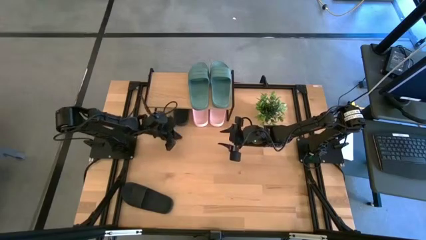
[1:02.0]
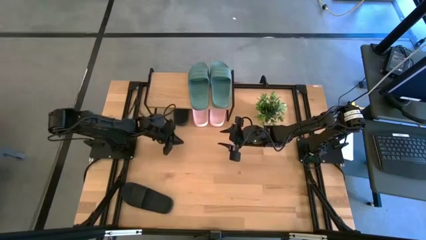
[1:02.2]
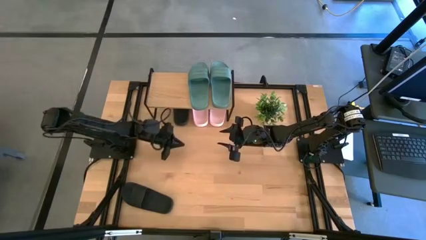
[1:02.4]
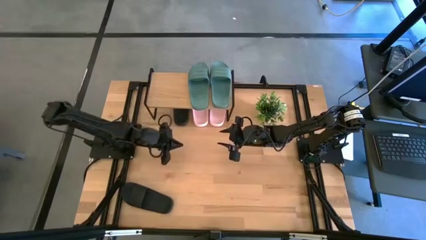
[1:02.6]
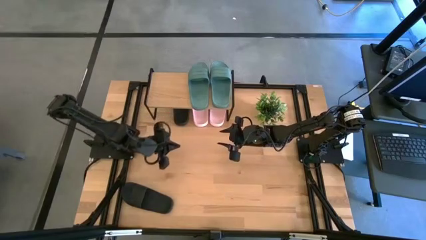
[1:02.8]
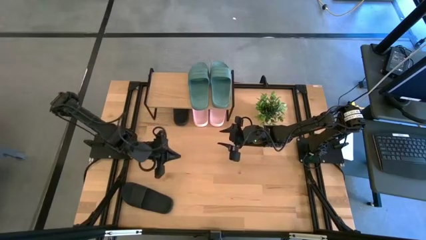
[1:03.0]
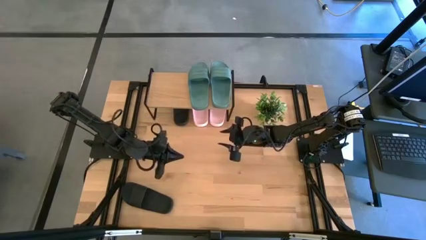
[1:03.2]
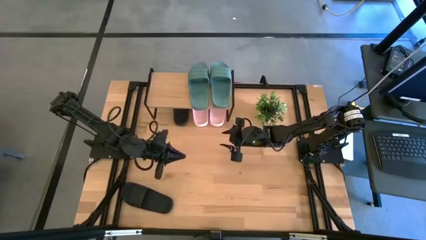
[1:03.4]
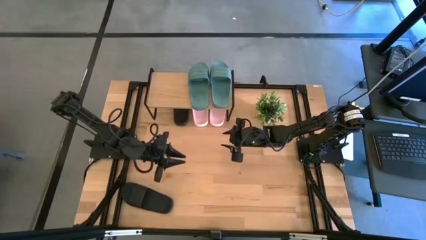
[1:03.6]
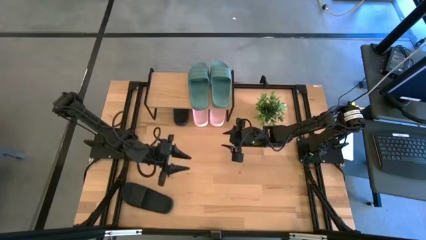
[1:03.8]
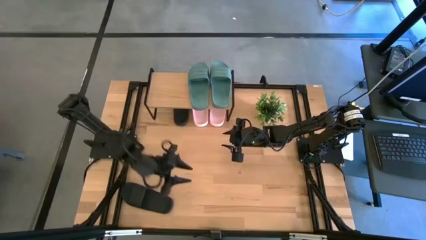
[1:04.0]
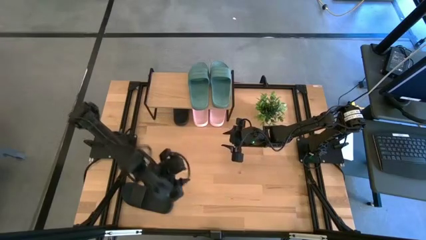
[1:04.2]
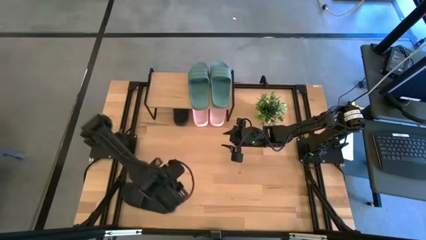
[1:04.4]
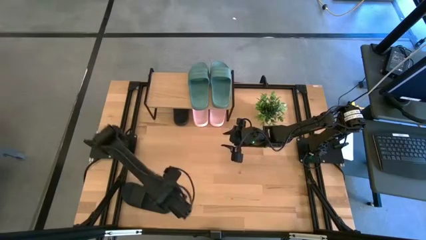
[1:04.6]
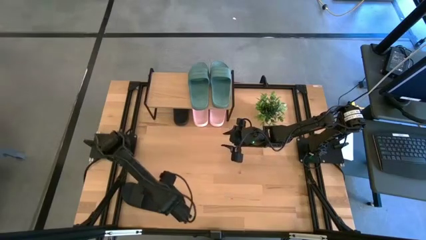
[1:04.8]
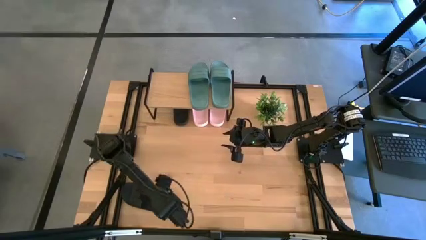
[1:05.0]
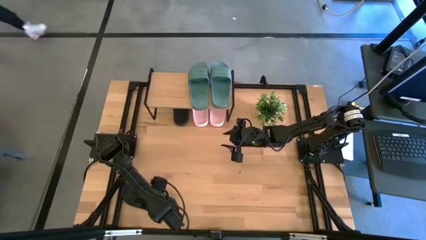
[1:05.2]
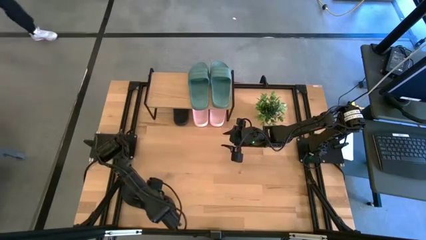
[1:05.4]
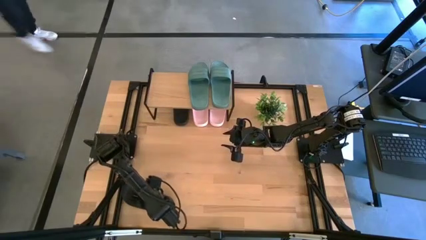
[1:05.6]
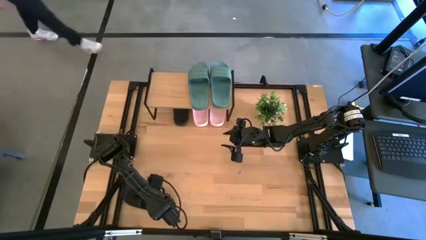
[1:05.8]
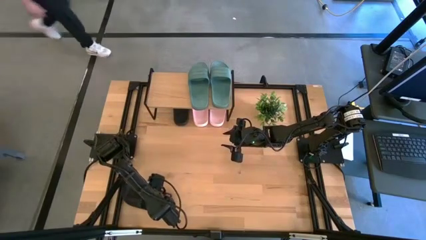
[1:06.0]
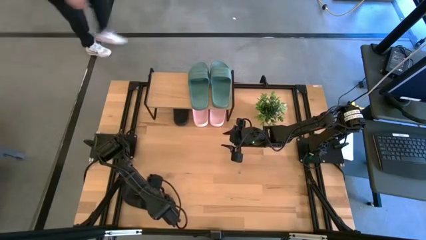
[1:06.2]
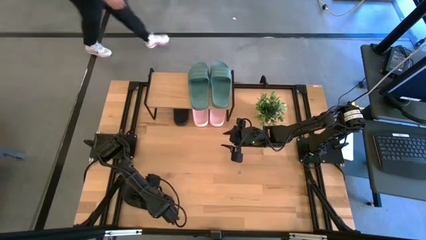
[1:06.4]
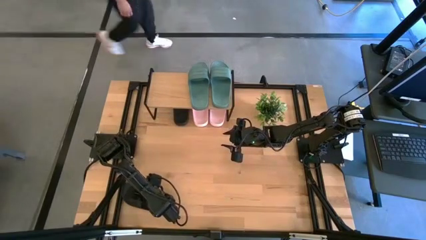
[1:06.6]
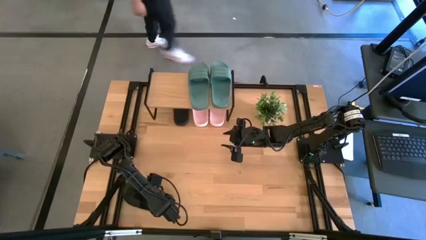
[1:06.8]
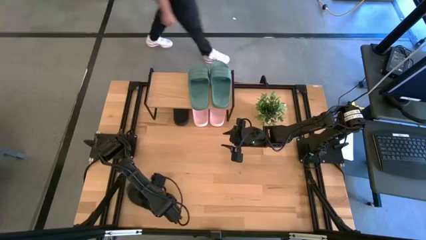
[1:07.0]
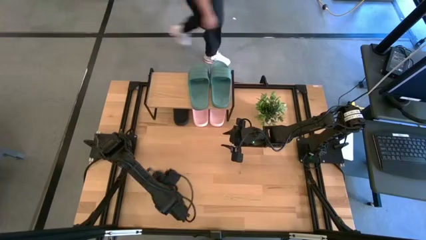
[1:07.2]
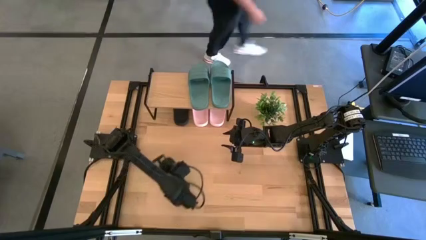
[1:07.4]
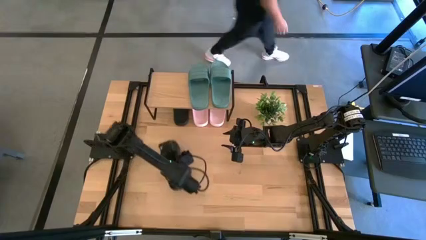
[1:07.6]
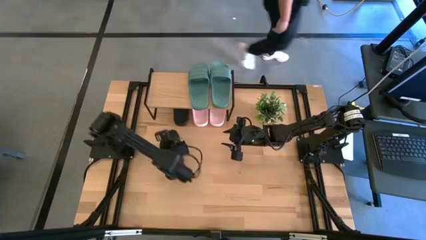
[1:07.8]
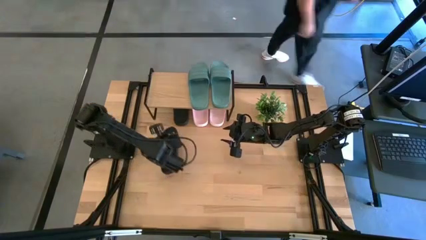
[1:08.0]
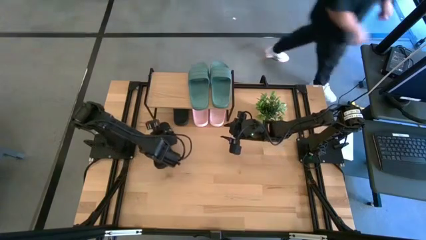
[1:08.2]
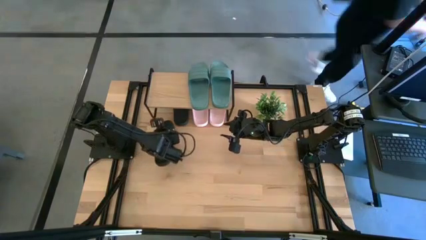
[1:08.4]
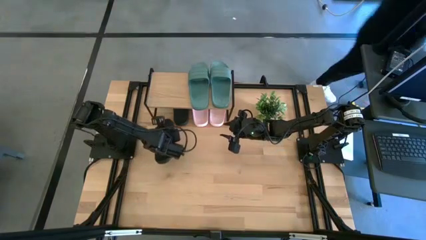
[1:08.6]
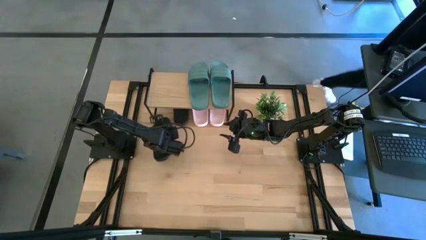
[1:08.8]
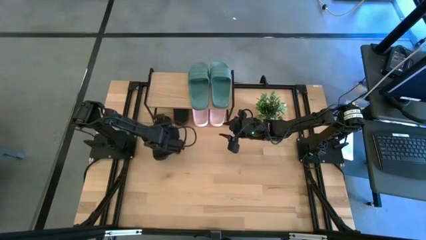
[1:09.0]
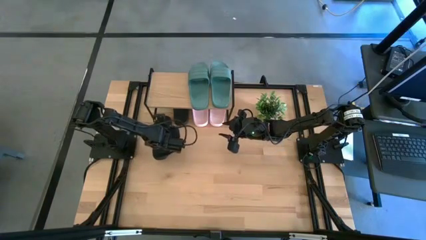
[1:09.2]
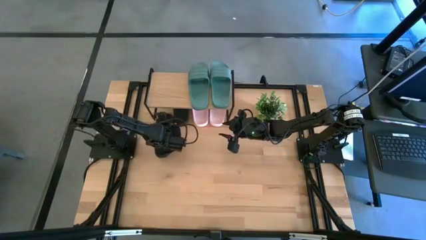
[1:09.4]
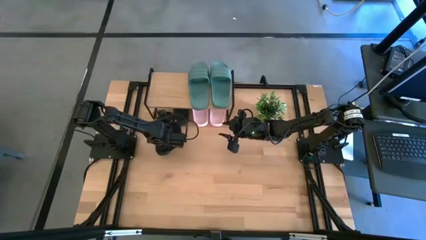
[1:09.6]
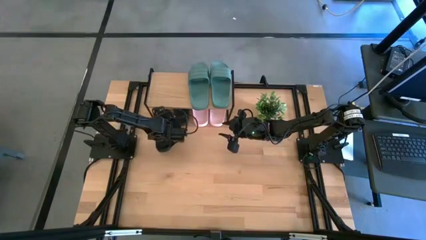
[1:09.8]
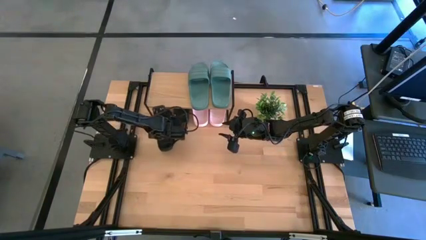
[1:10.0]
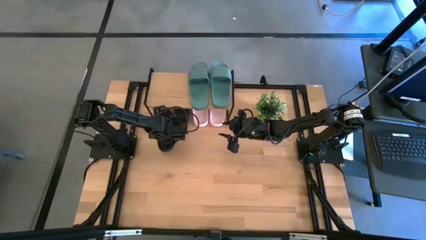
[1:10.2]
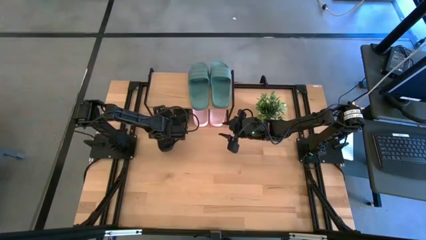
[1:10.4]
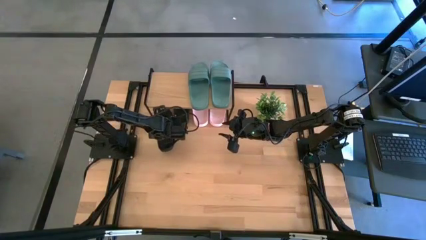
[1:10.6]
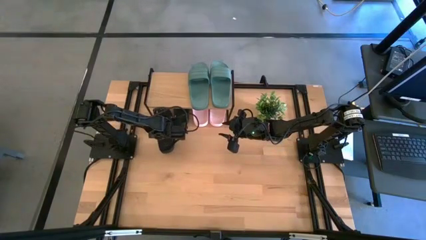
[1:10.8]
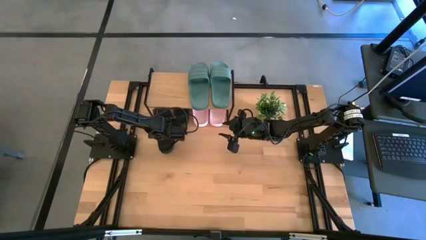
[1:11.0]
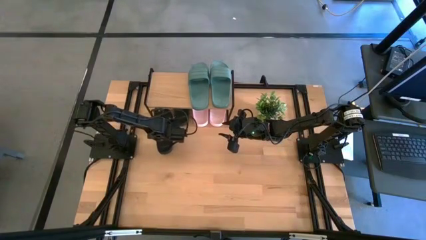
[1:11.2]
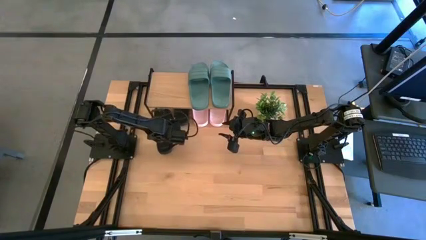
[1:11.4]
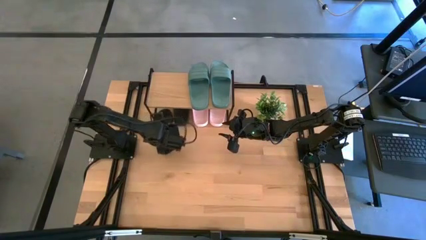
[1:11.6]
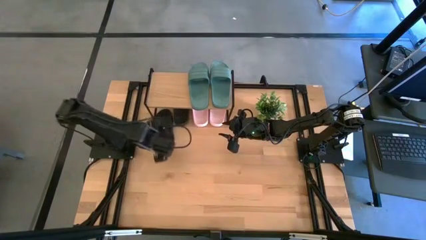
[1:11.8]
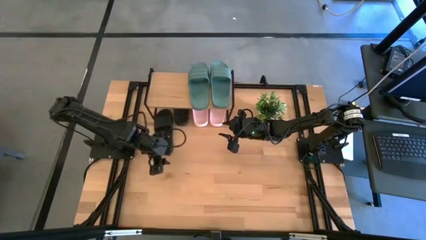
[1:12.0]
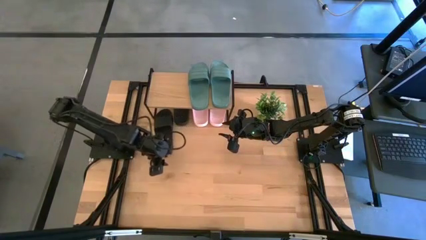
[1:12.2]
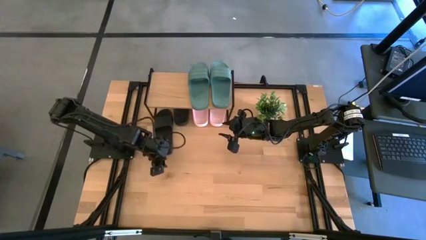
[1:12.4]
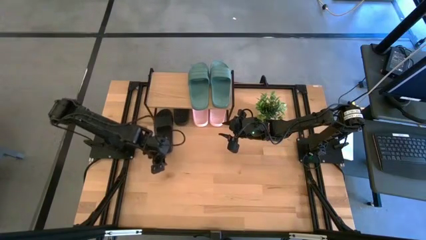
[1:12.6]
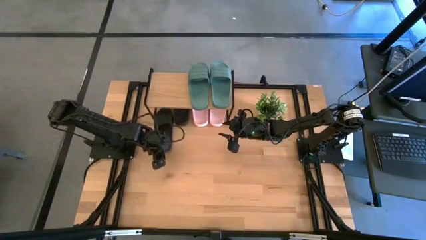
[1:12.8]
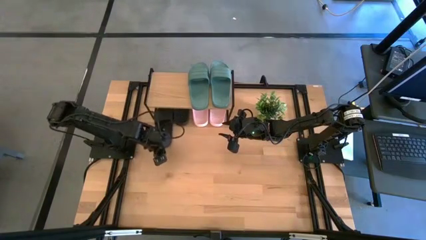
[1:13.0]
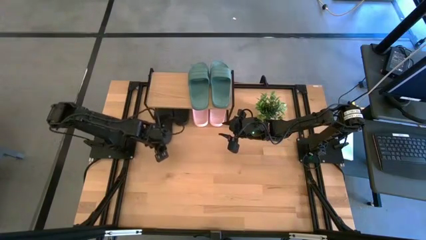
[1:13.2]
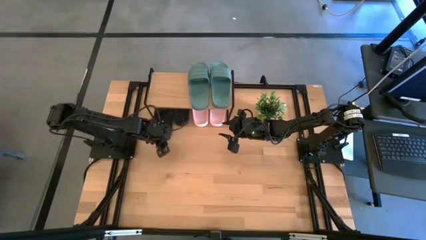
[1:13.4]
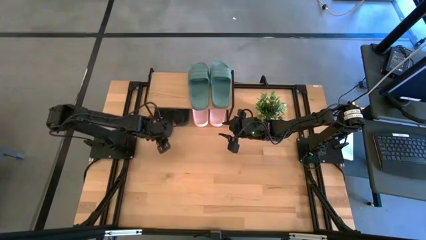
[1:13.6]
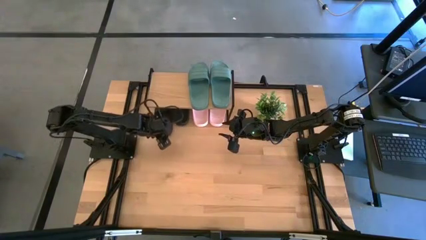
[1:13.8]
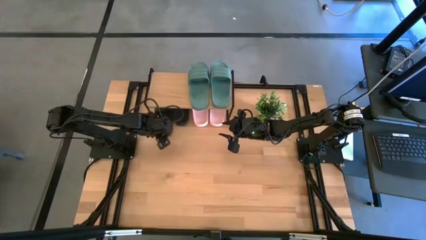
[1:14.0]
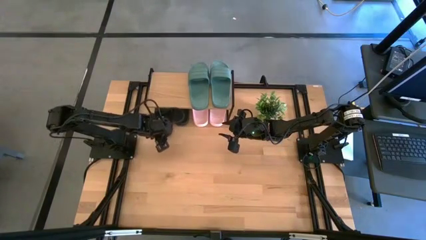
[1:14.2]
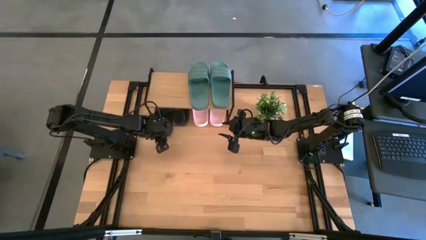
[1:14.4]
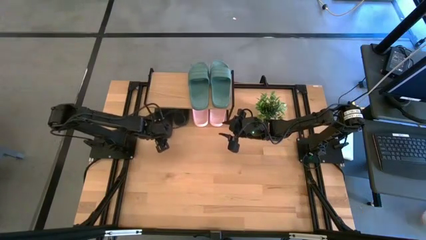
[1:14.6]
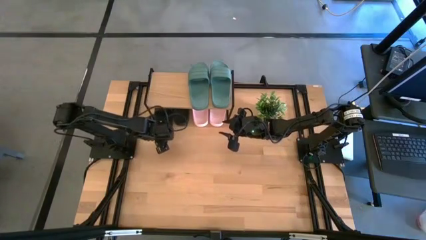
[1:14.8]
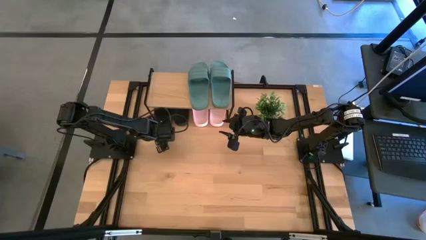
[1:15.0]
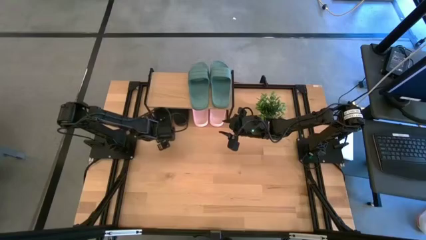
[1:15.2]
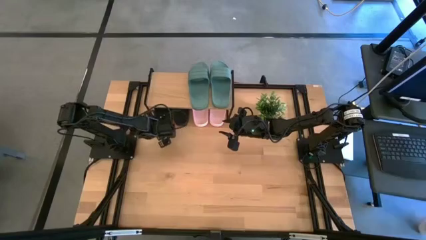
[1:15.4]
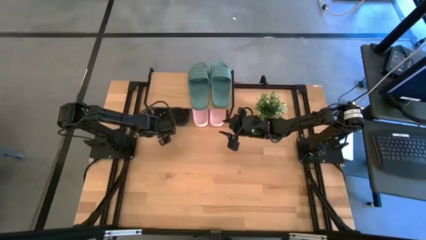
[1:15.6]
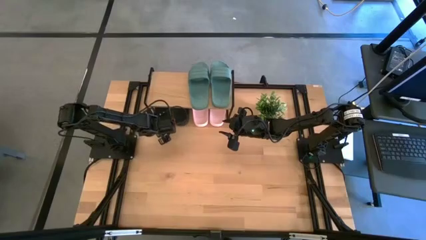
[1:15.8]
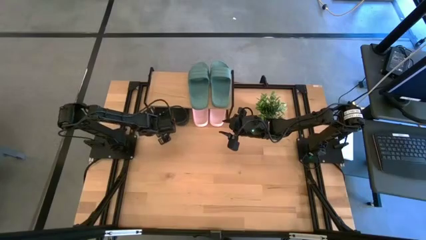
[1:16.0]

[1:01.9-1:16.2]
Task: Pick and place slides into the shelf
Put the black slide under the shelf
